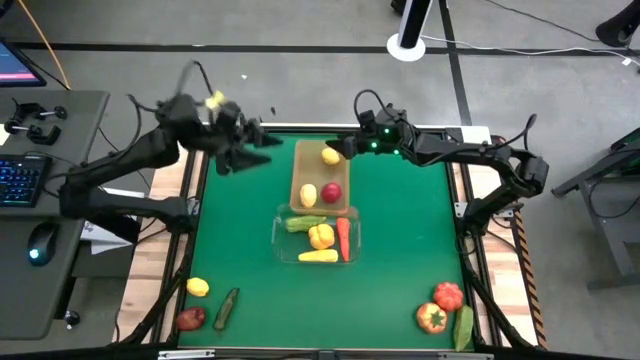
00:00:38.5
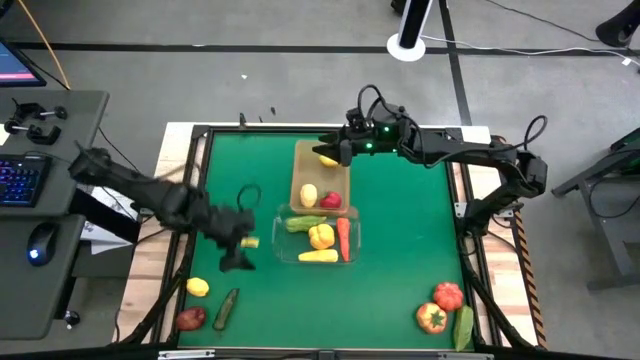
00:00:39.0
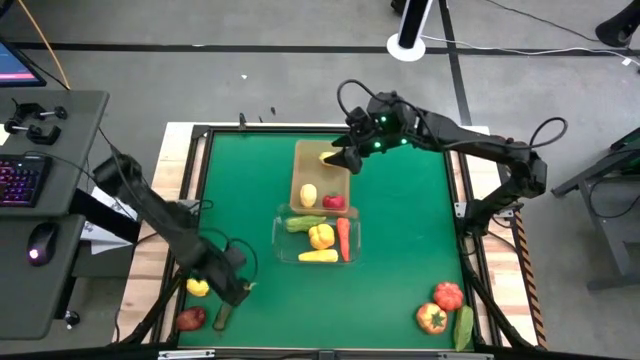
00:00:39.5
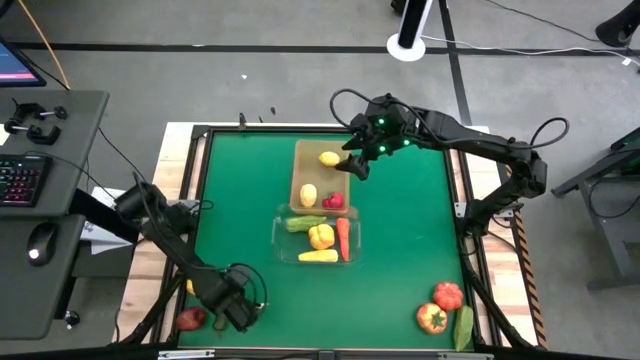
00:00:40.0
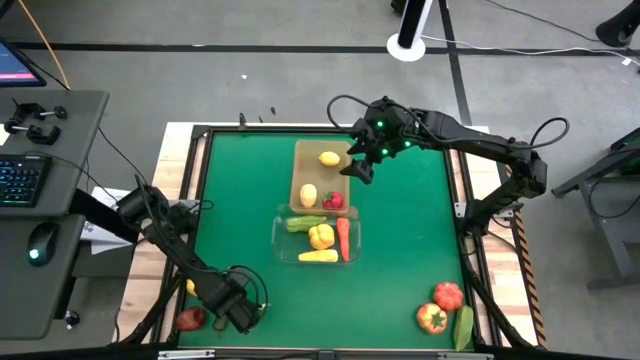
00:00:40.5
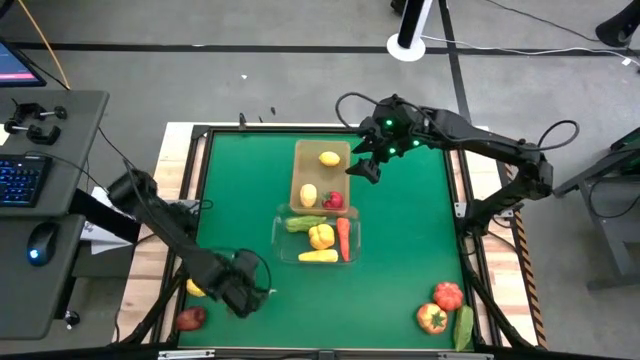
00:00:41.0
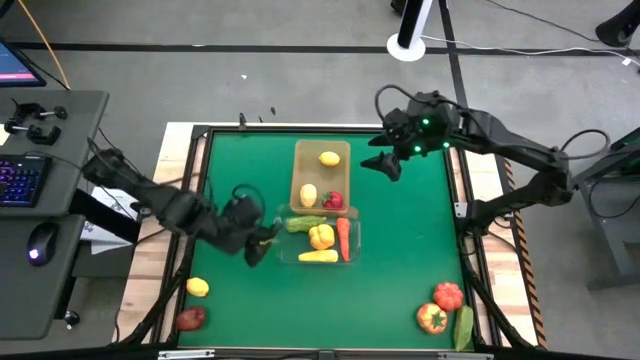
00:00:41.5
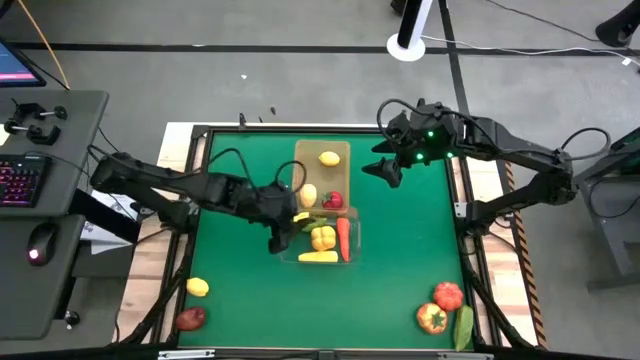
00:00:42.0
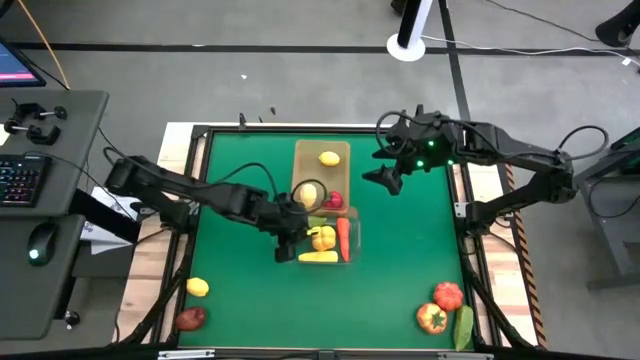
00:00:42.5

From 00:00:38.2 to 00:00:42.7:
Task: Sort produce into baskets
Put the green chili pepper into the transparent bin

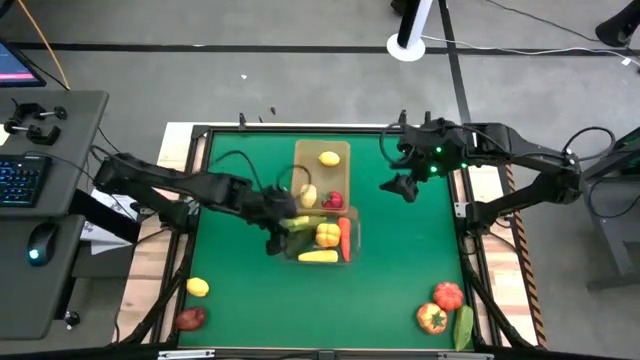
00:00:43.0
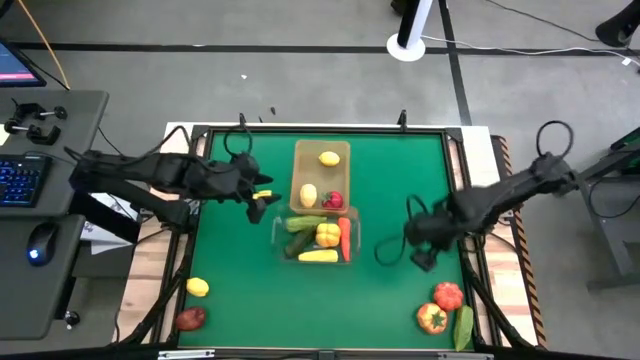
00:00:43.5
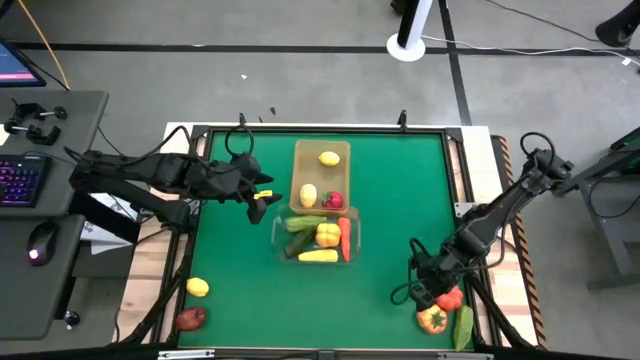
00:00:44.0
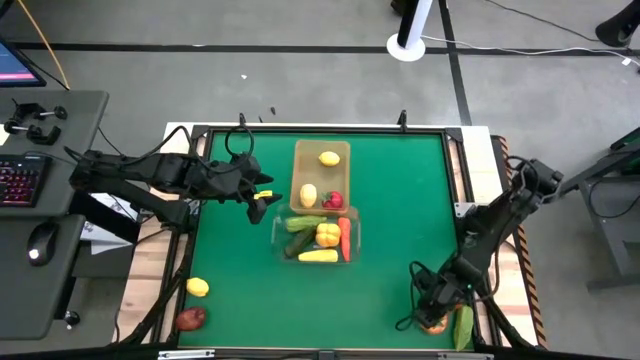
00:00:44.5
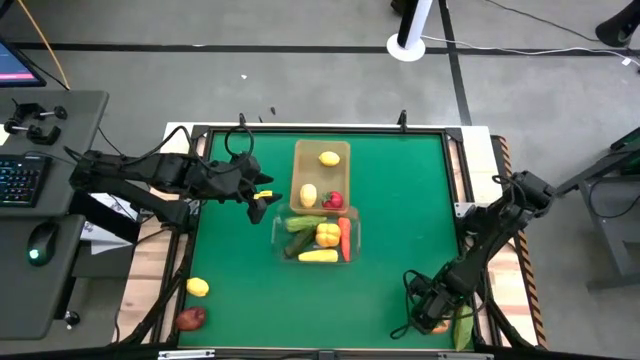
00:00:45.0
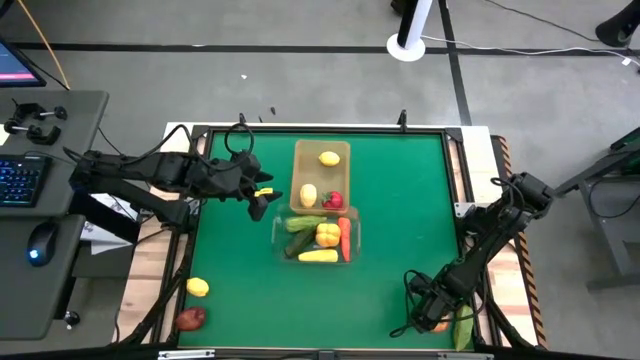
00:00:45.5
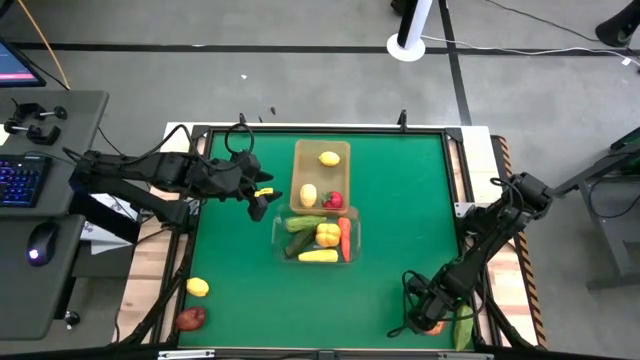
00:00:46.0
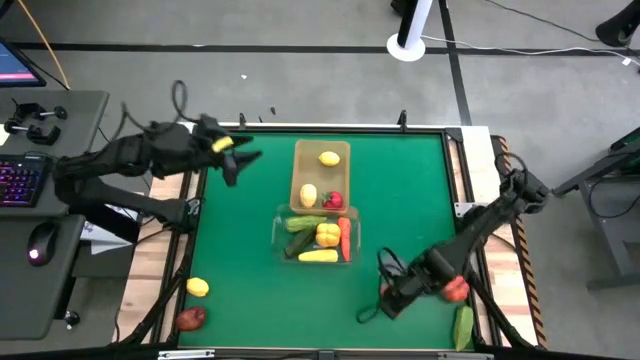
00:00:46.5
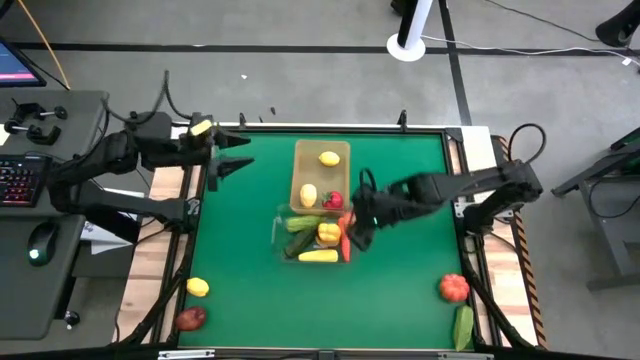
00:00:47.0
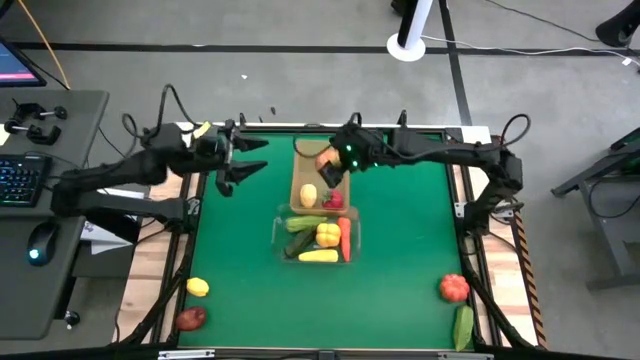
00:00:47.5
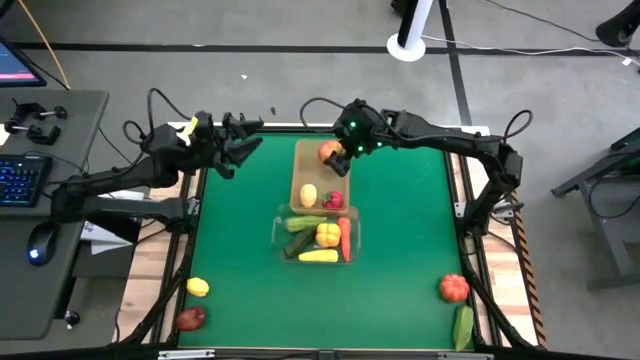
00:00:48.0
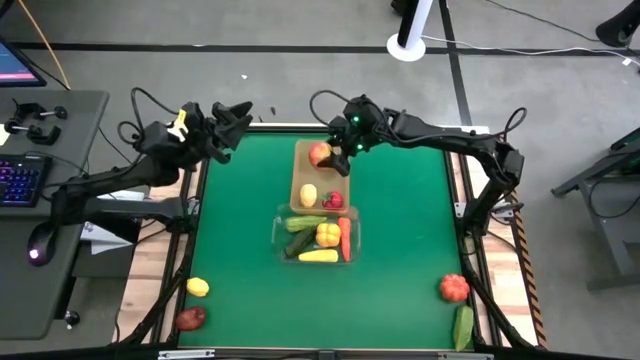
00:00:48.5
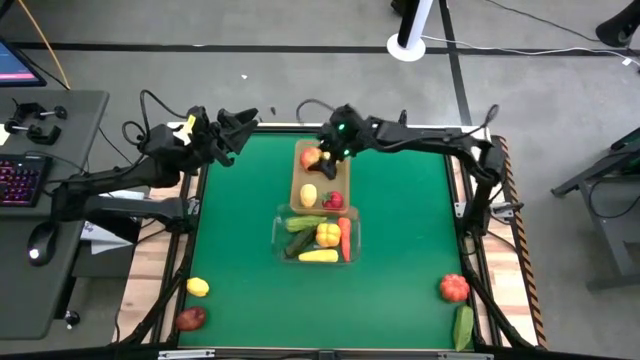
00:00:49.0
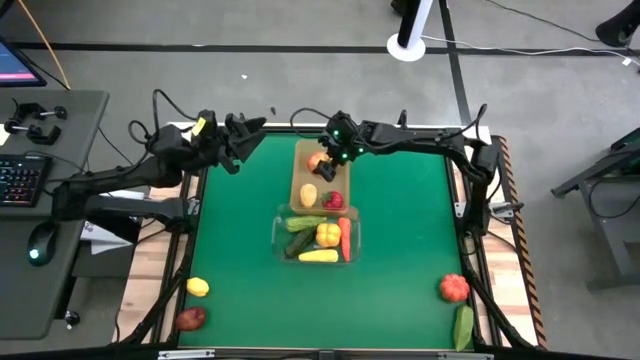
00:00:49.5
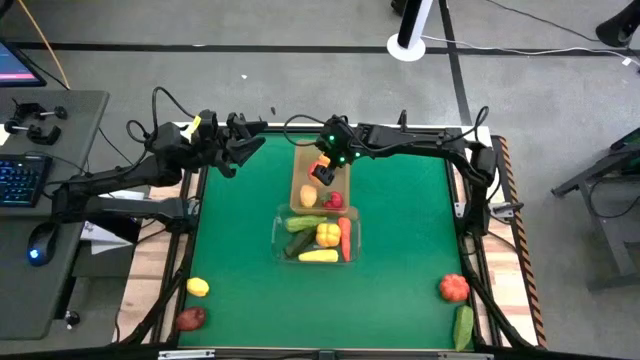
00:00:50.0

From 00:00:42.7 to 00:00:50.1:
Put the orange tomato into the orange bin

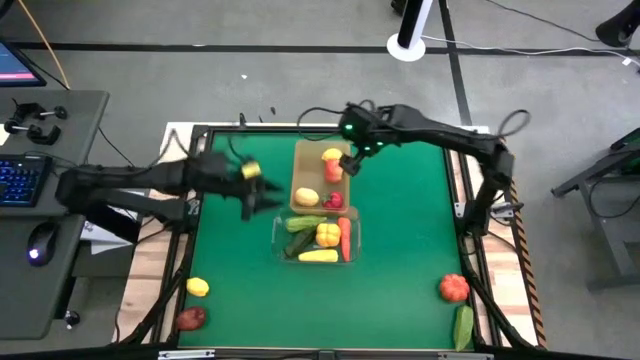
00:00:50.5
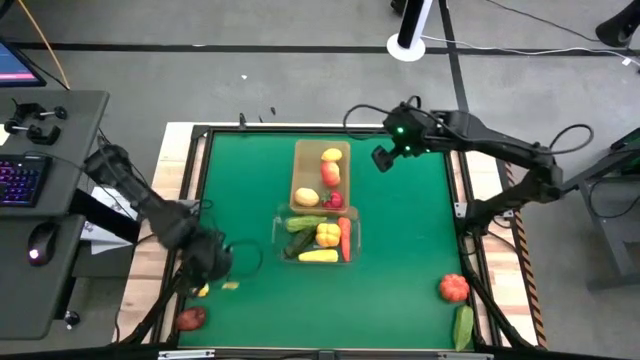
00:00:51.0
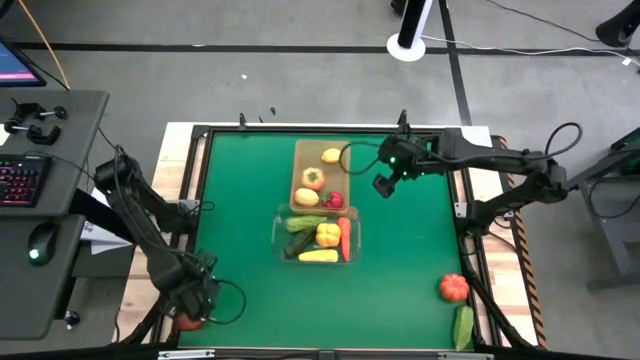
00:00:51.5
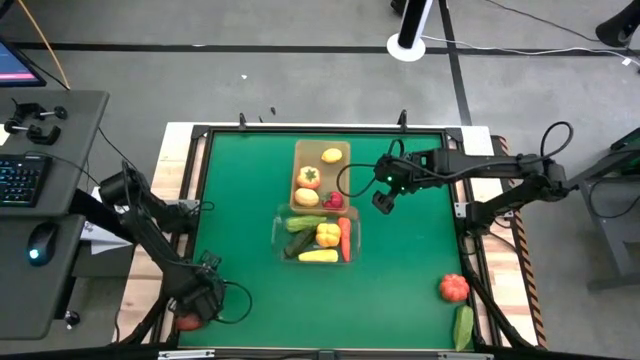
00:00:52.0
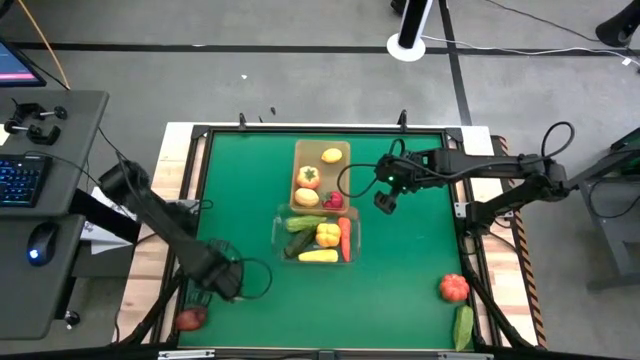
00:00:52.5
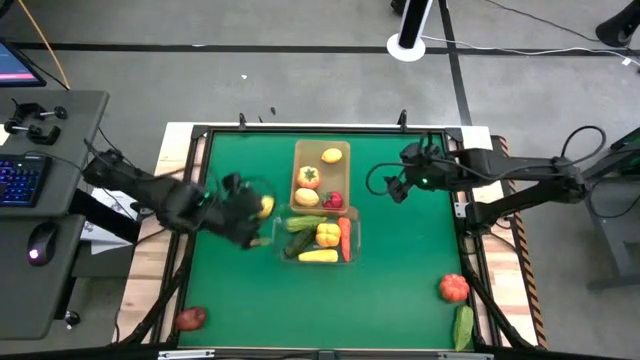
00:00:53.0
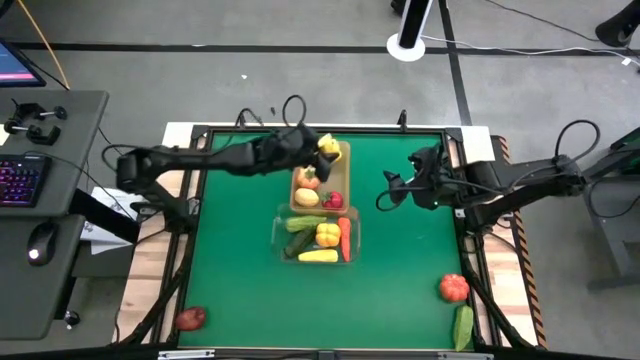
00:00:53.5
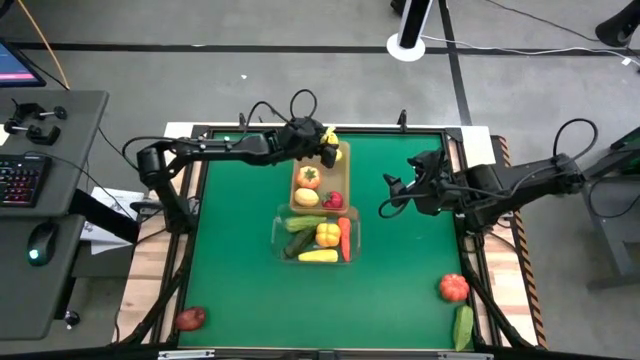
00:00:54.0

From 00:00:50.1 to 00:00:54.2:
Put the yellow lemon into the orange bin

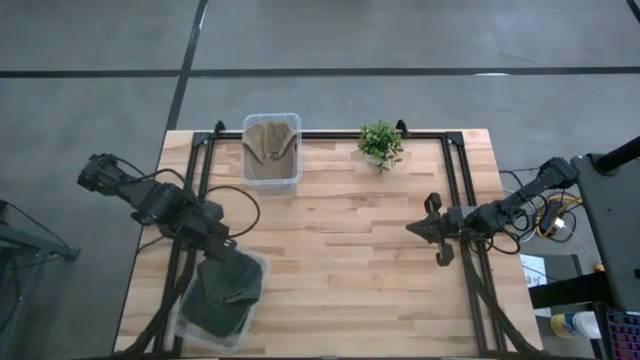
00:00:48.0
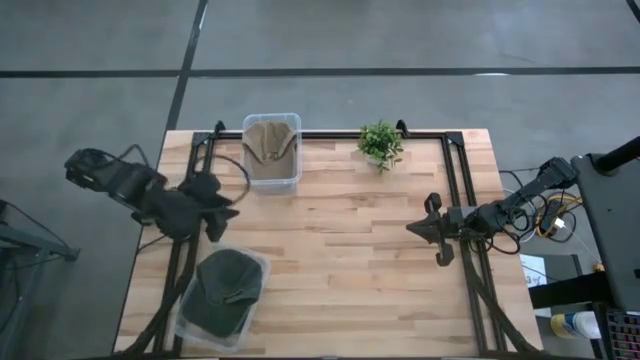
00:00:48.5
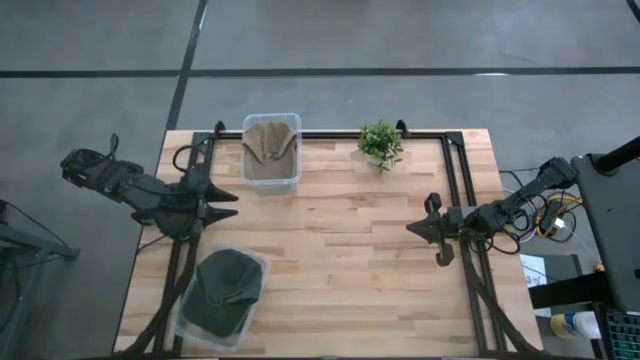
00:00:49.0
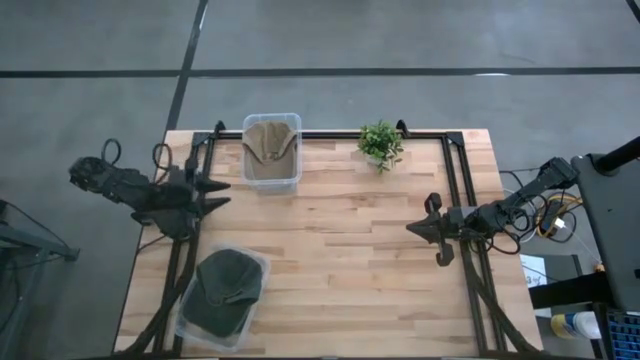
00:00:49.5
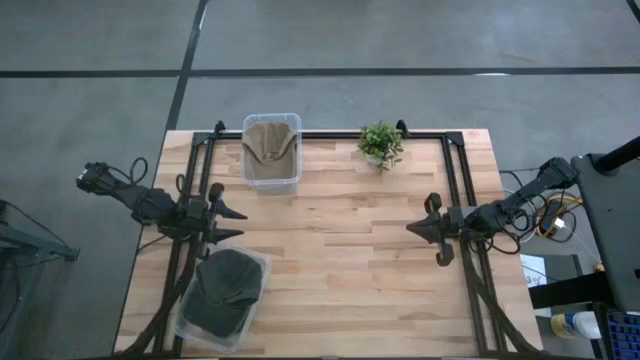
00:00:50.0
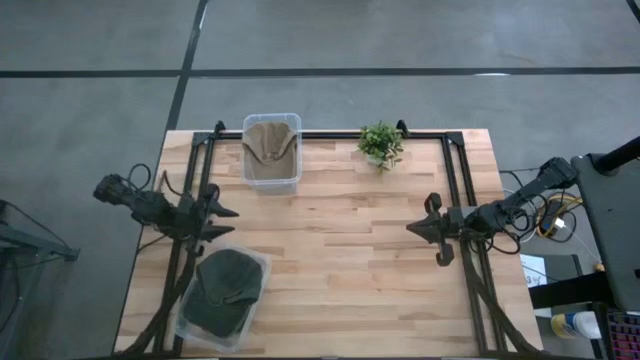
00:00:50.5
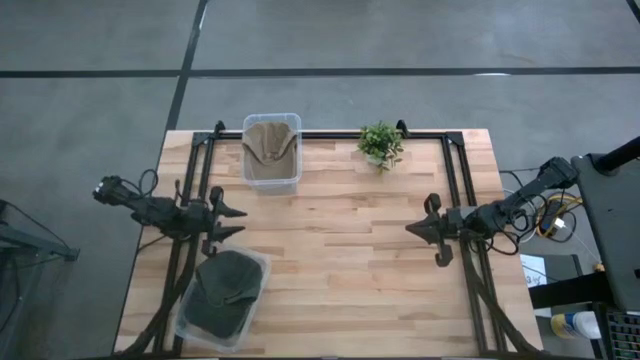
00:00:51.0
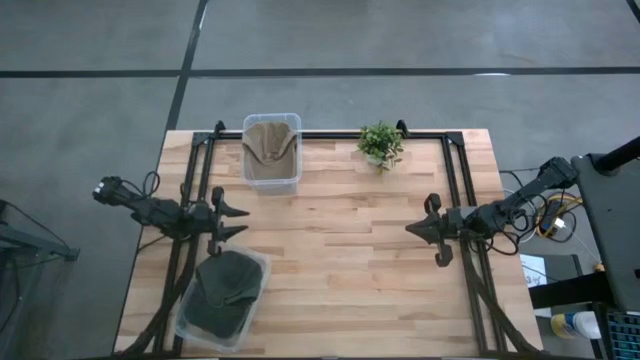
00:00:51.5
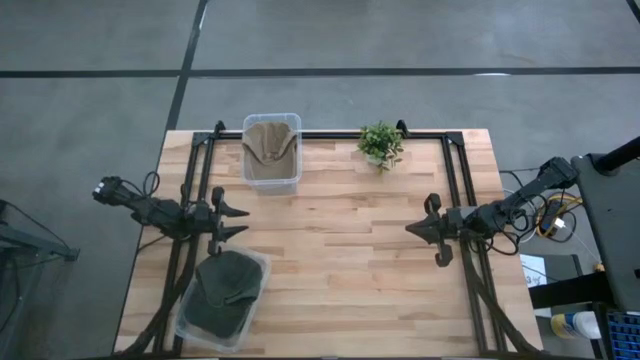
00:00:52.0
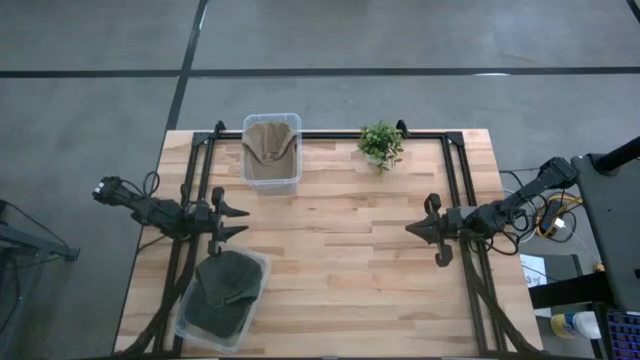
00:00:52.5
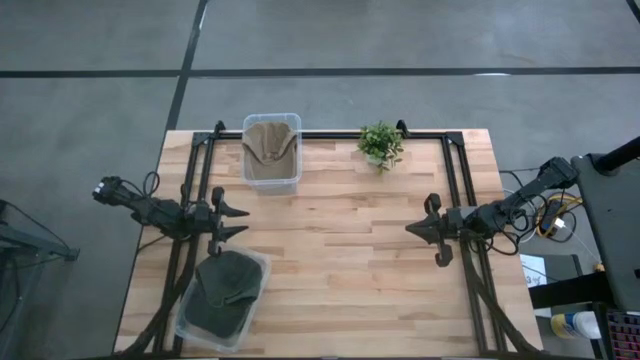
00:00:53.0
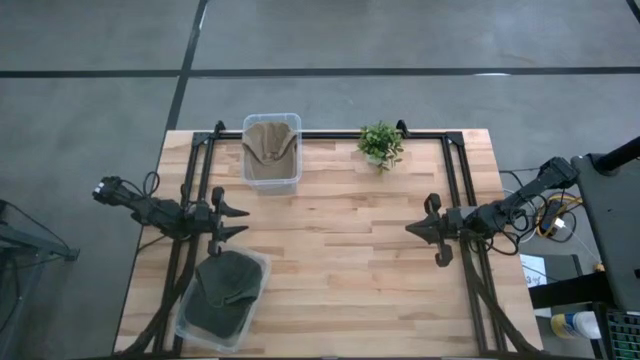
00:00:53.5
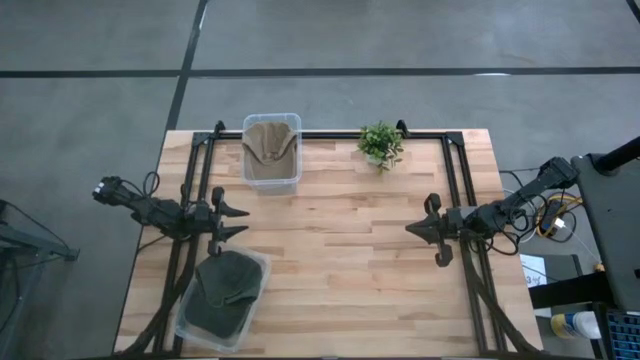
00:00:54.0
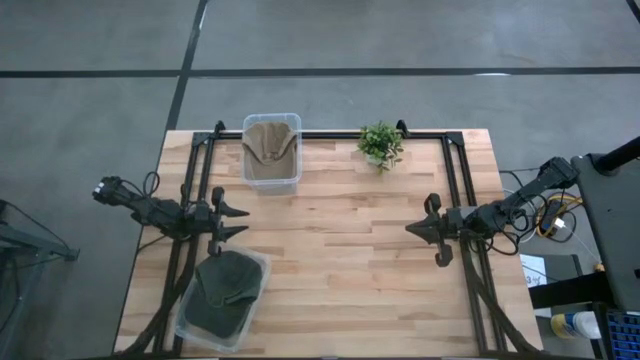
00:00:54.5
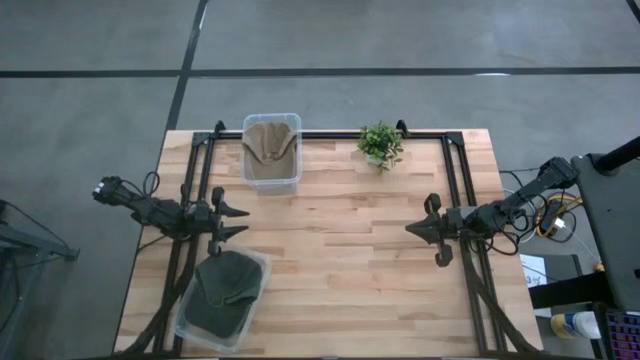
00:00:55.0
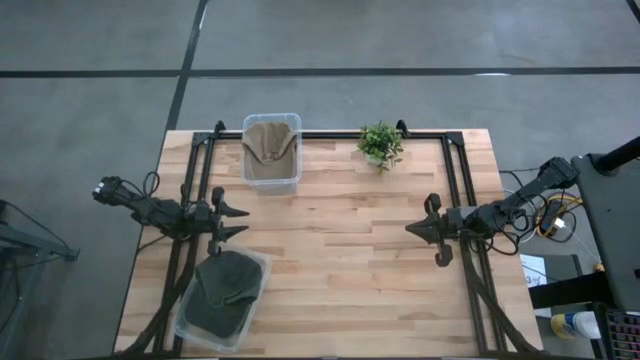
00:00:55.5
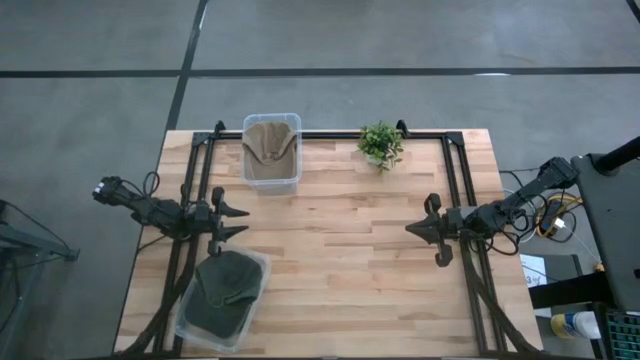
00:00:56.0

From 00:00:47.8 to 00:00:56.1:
Task: Pick & Place hat
Return to Home Position
